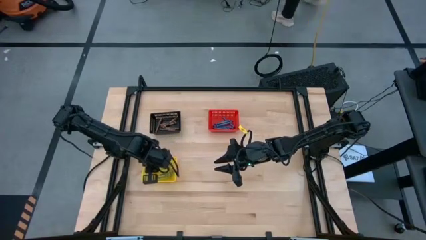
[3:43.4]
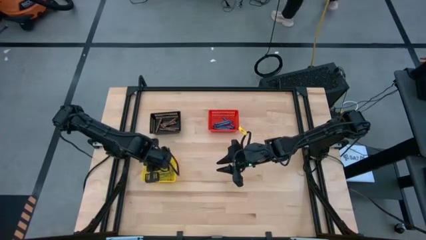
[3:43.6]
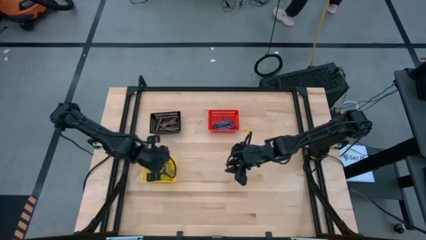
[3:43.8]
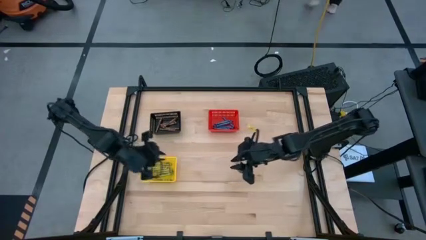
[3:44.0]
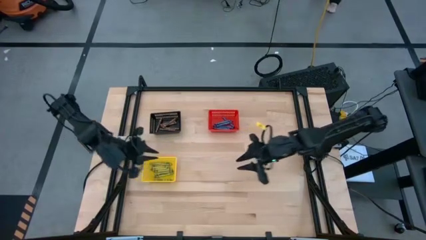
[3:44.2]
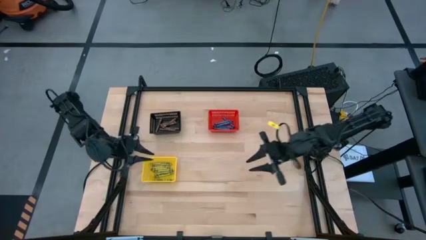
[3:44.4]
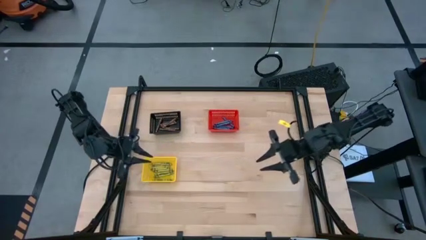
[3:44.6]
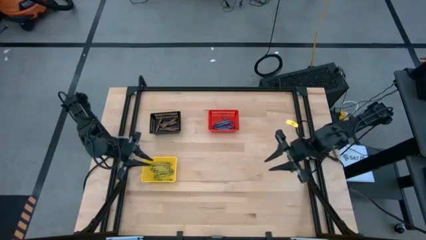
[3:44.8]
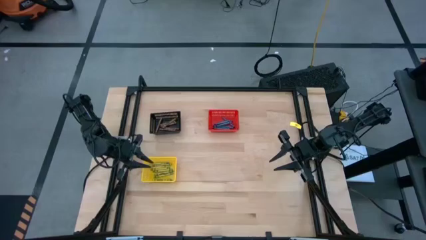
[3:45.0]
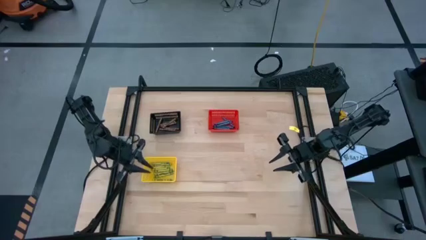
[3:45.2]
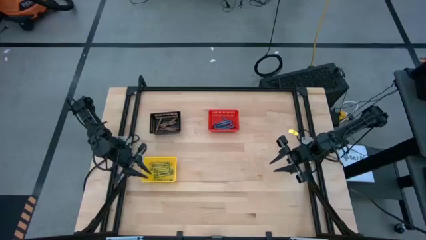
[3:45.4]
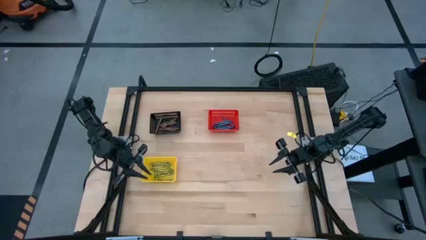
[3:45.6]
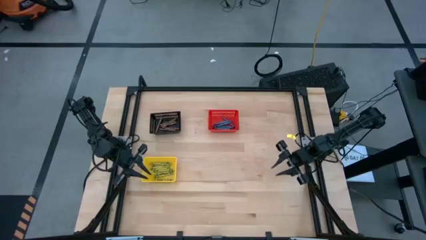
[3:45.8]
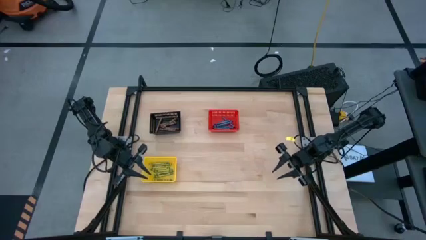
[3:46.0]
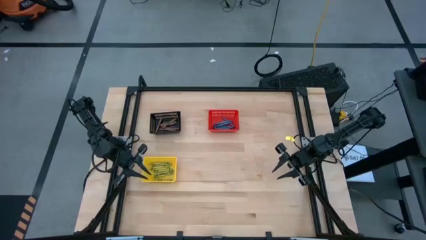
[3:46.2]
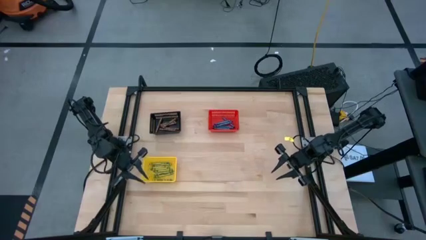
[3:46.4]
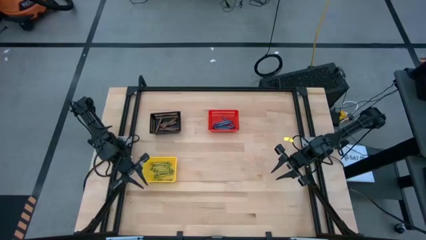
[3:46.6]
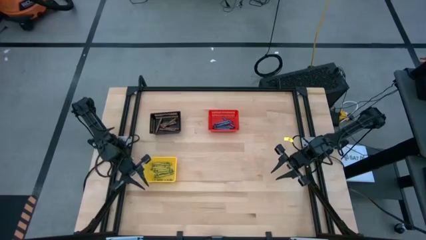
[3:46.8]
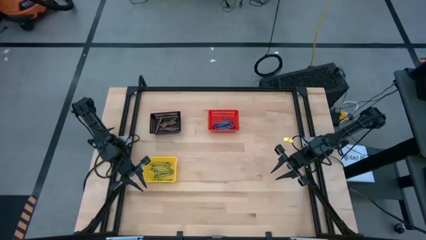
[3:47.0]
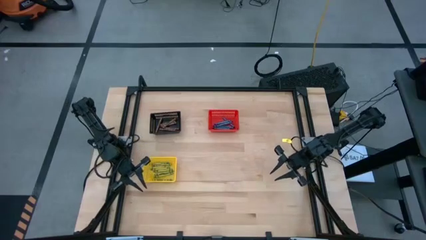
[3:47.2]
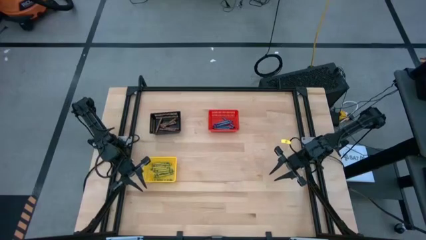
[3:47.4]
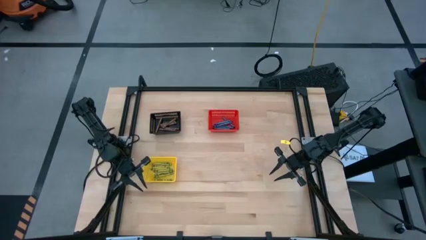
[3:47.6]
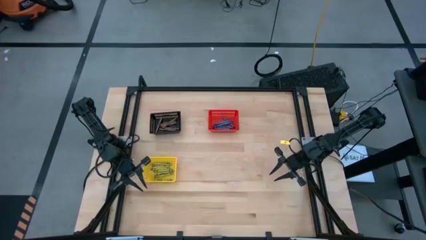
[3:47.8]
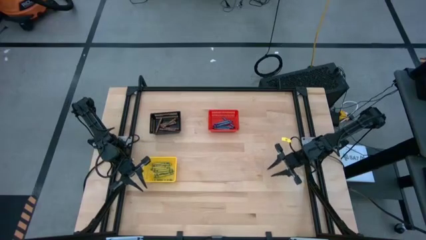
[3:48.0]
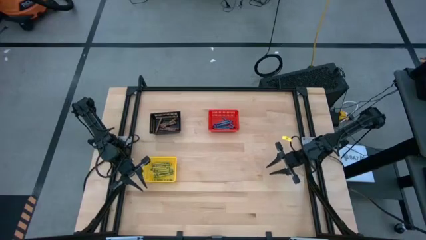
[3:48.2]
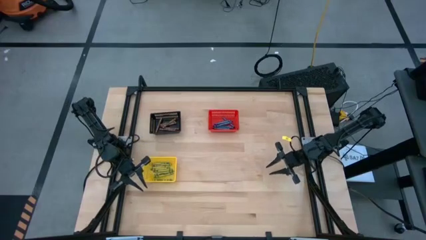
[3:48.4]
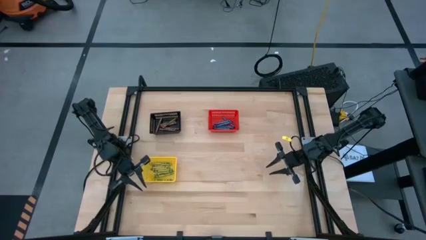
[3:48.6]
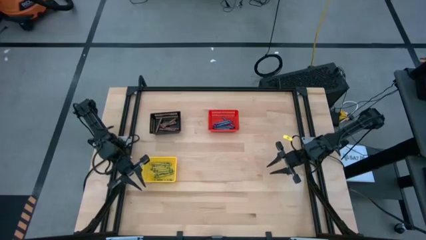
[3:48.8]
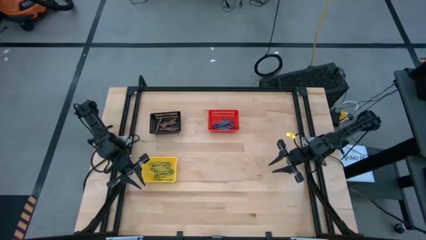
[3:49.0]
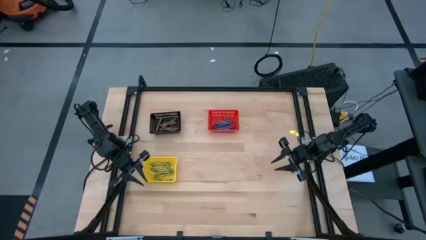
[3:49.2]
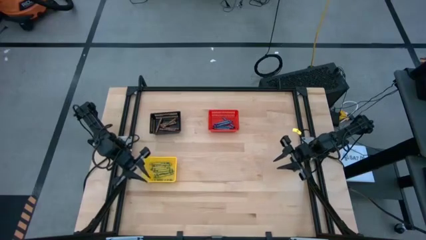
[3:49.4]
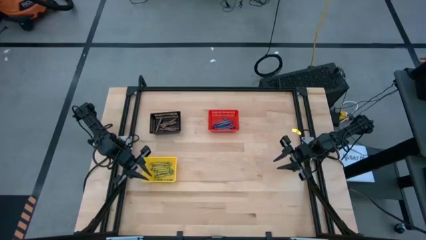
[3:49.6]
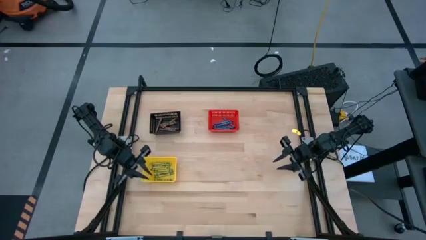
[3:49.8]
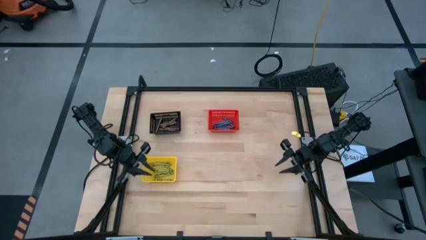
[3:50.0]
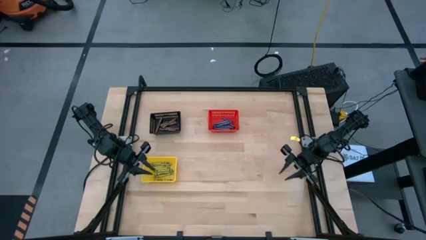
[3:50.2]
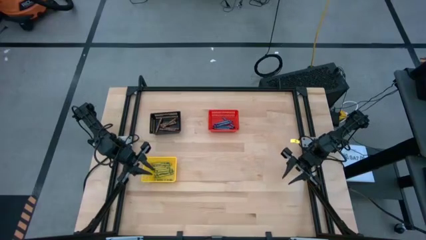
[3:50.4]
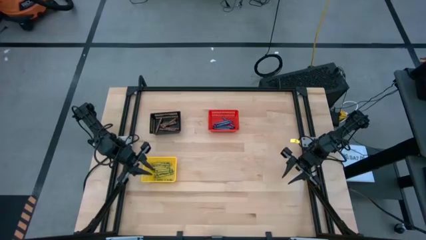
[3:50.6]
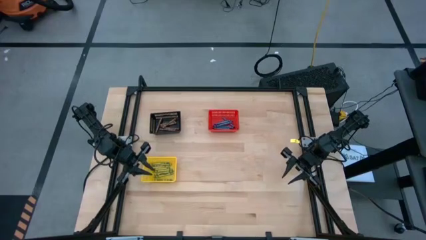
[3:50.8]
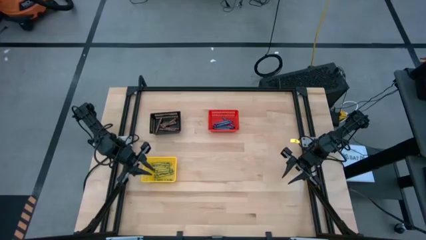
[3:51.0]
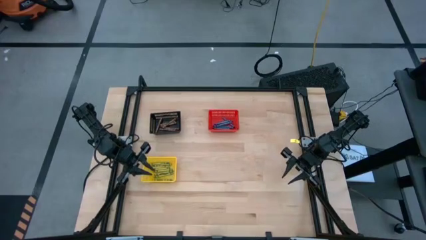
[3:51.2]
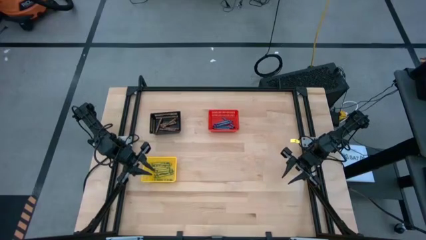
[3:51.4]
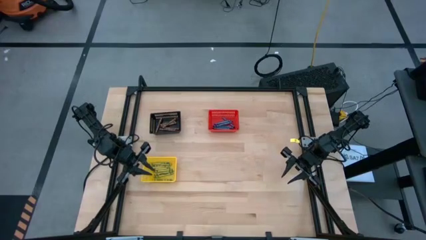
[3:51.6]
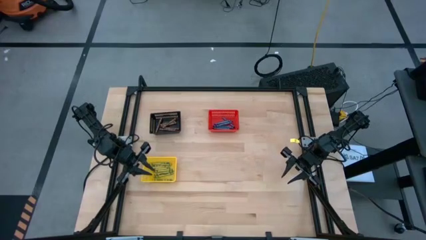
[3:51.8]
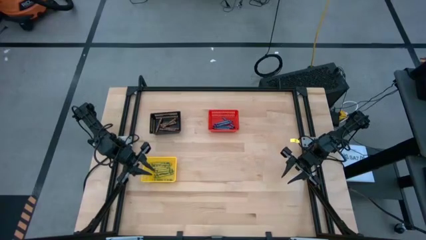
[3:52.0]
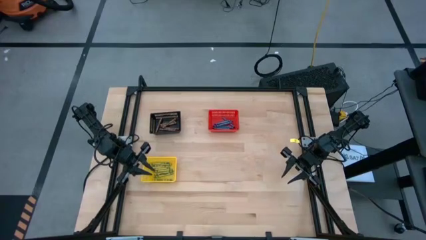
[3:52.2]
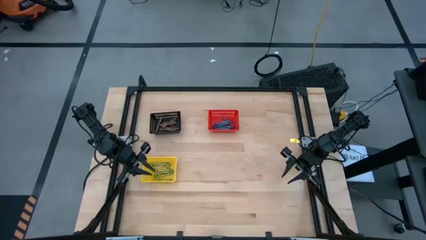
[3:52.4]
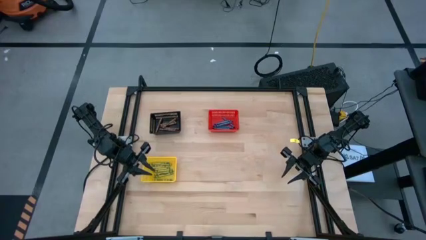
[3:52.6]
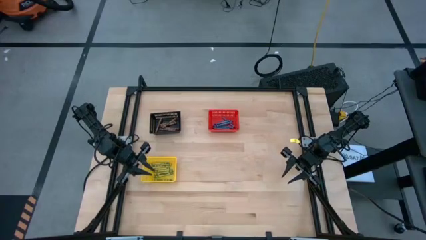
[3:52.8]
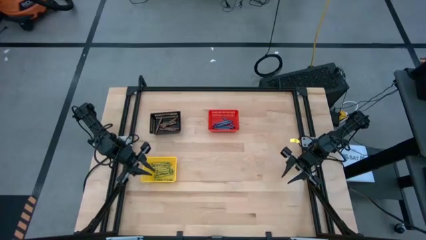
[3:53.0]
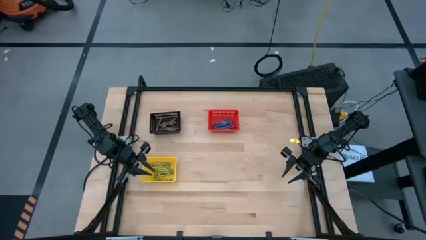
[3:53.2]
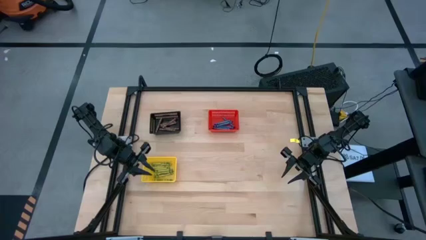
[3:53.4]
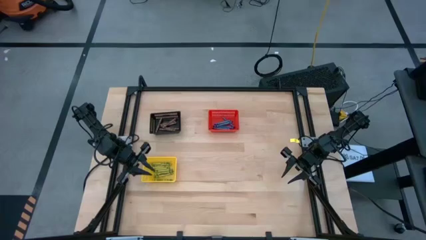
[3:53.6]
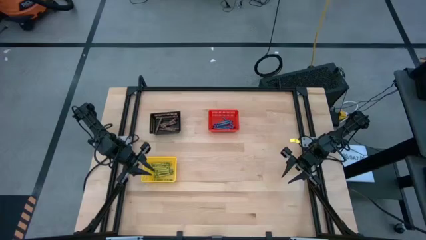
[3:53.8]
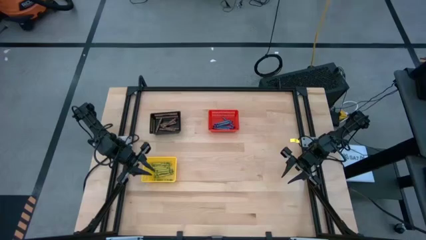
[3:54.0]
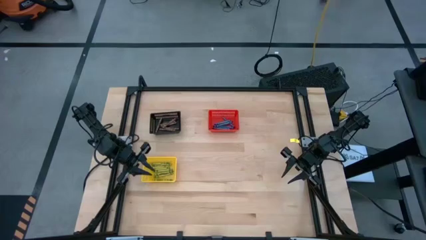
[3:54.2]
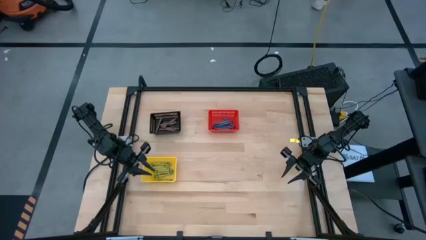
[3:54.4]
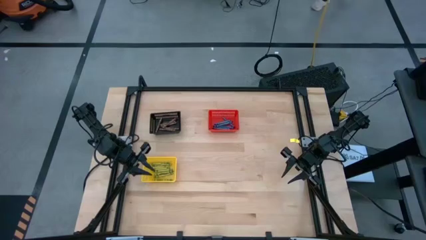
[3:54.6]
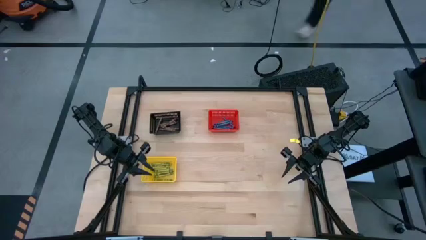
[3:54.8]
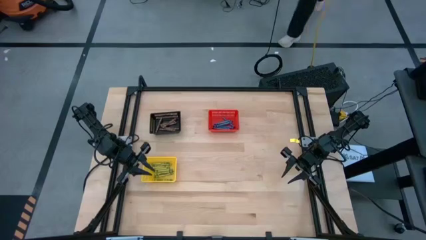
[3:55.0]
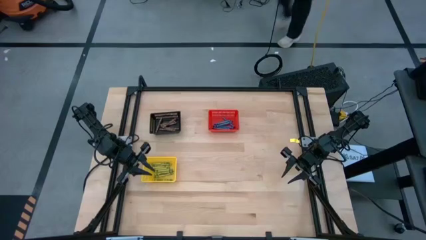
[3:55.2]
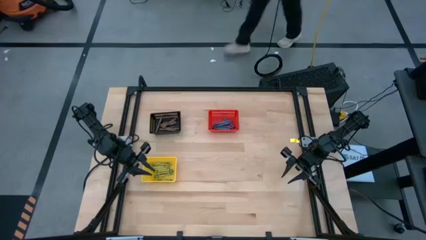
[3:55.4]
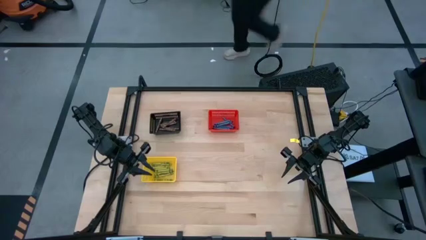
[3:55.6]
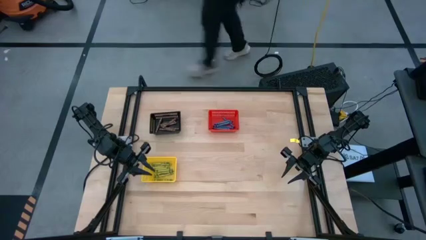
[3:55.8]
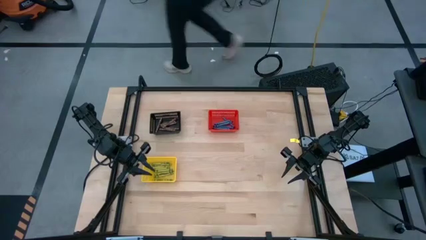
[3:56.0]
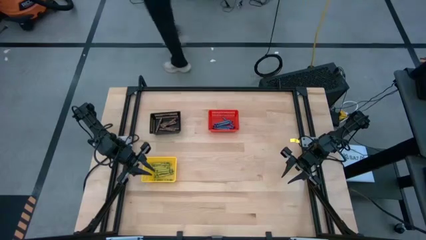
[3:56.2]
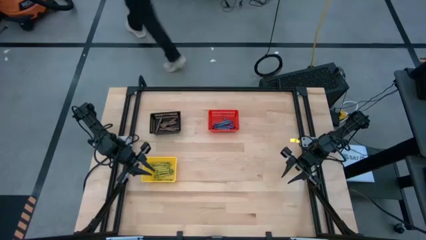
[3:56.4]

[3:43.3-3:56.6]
Task: Sort crayons
Return to Home Position
